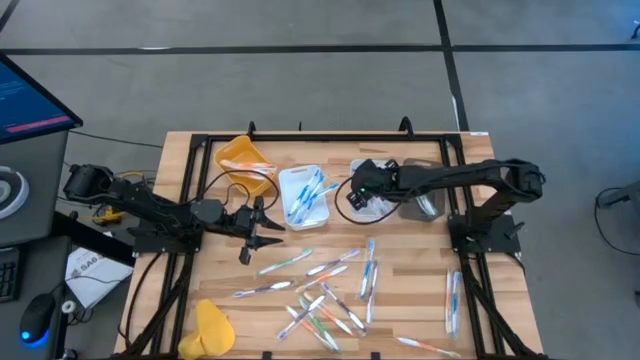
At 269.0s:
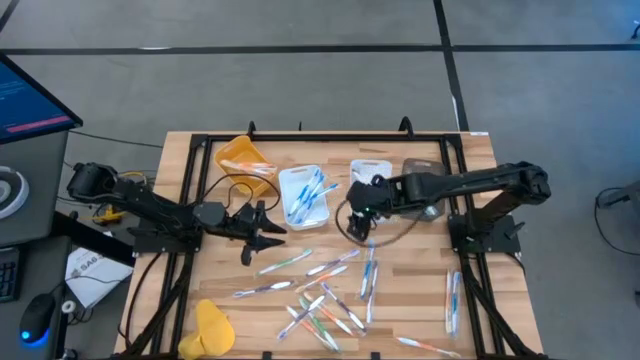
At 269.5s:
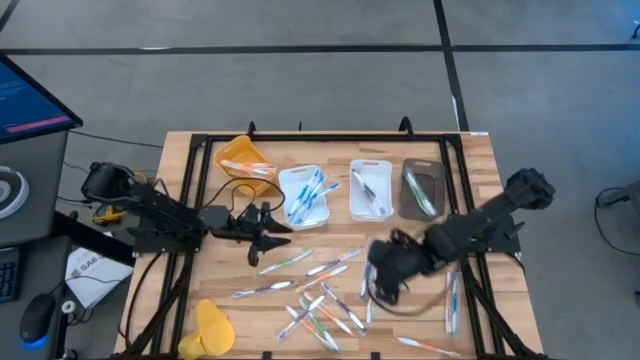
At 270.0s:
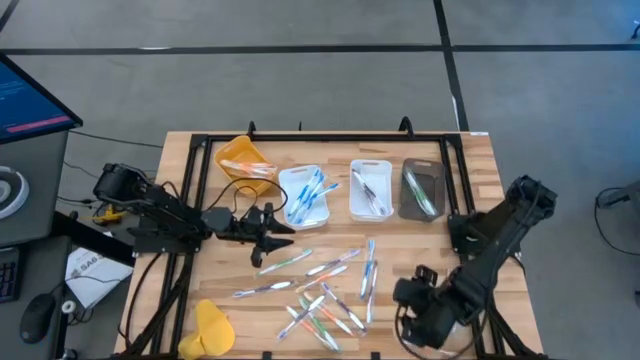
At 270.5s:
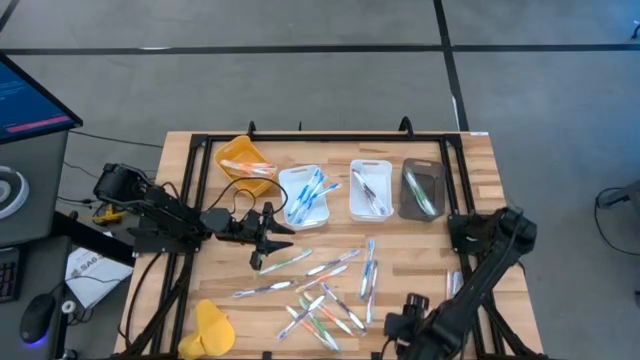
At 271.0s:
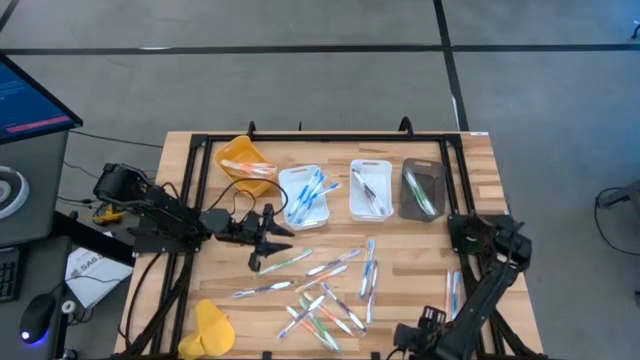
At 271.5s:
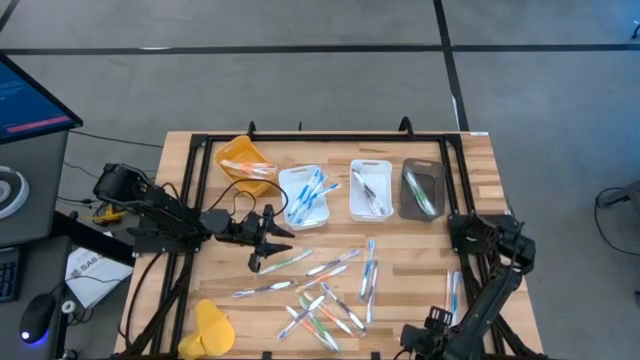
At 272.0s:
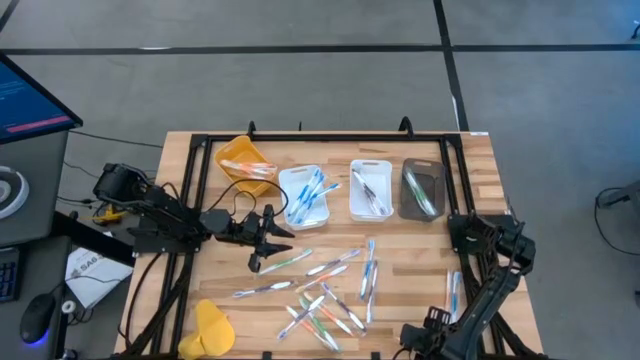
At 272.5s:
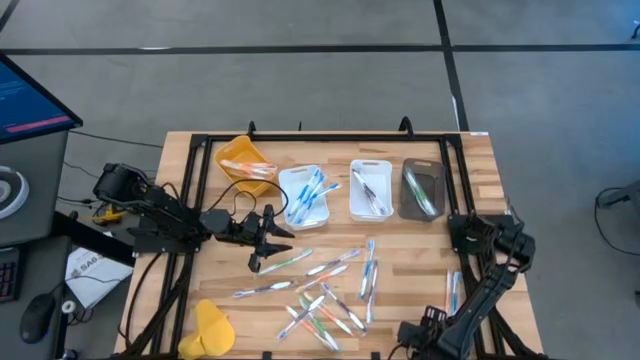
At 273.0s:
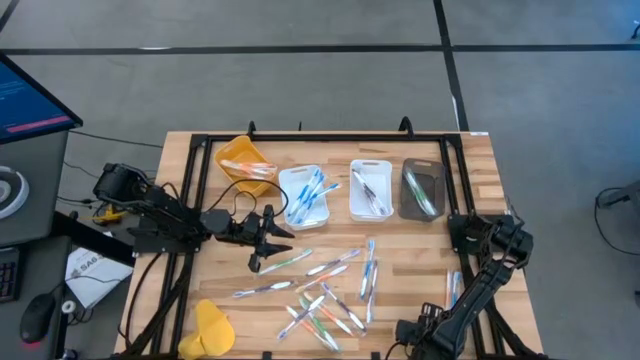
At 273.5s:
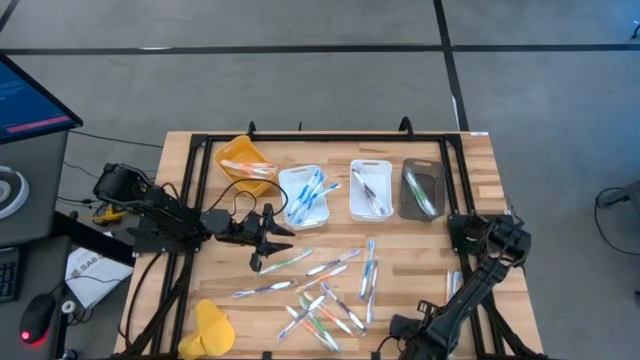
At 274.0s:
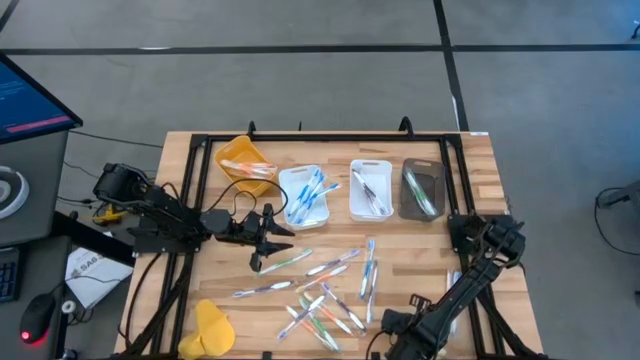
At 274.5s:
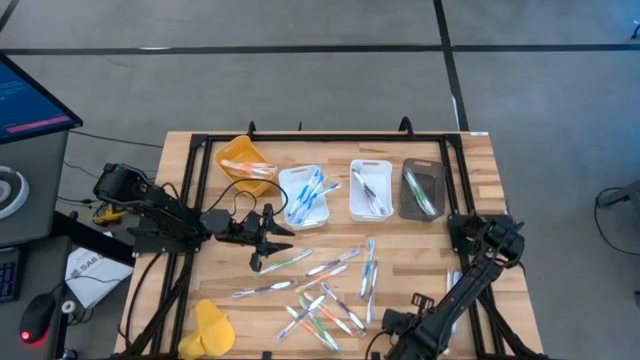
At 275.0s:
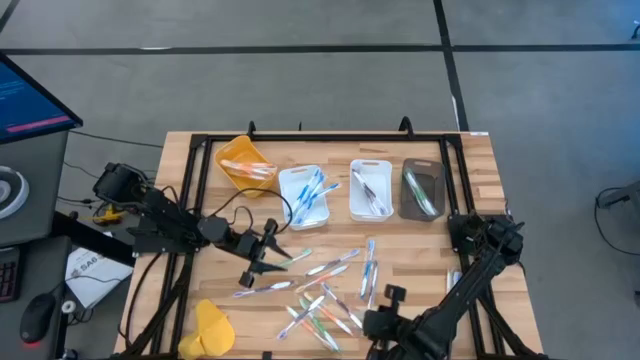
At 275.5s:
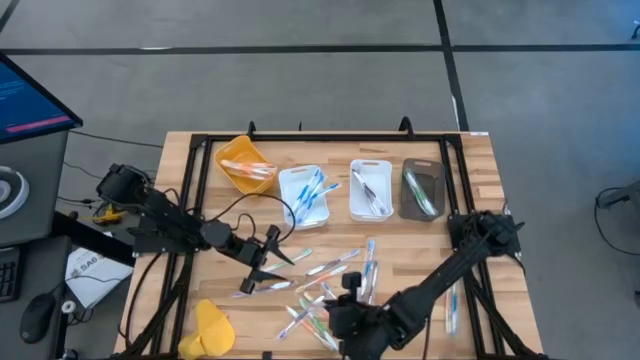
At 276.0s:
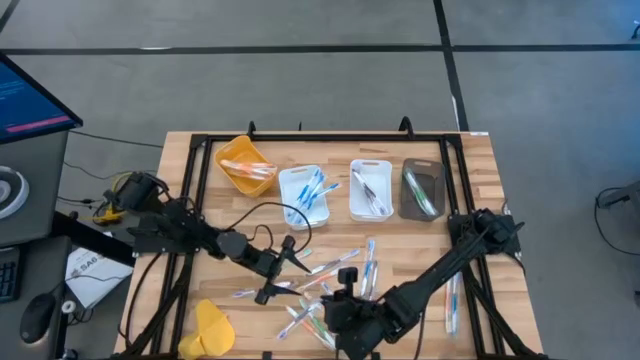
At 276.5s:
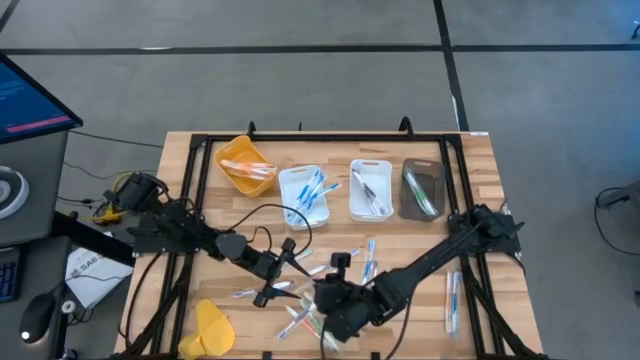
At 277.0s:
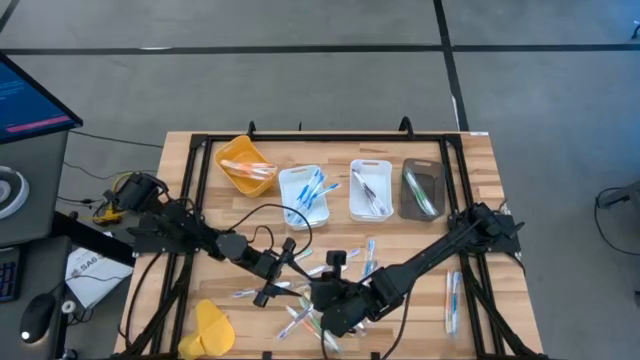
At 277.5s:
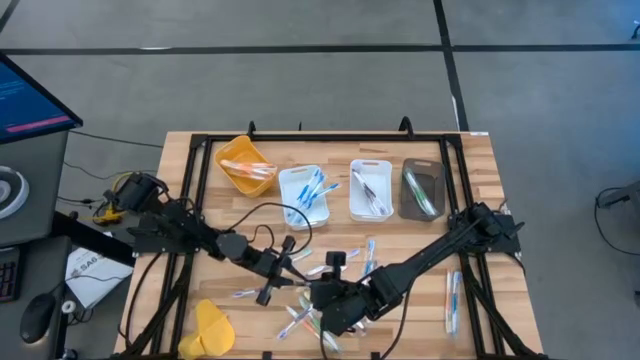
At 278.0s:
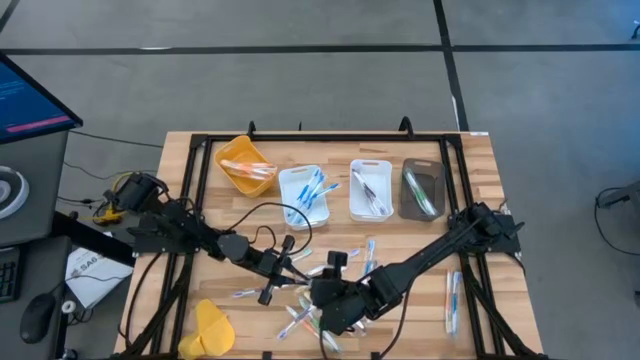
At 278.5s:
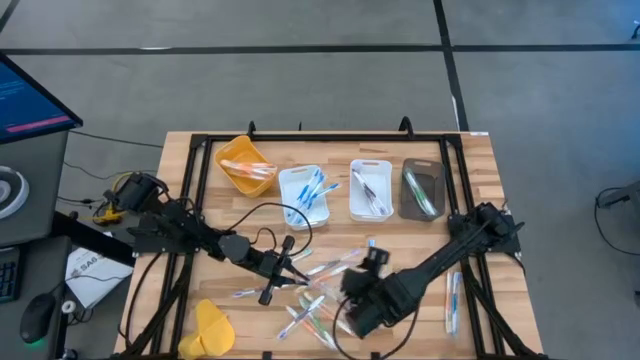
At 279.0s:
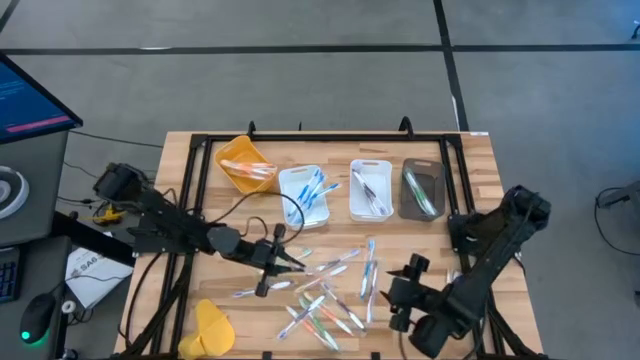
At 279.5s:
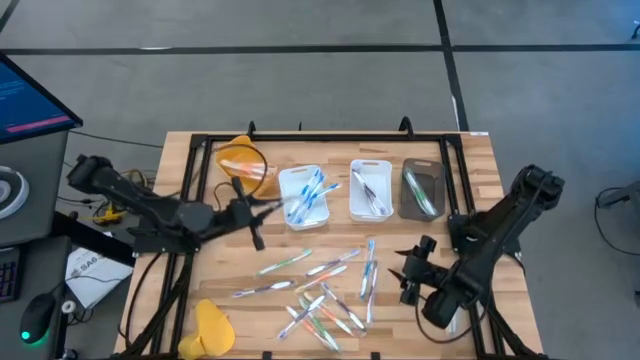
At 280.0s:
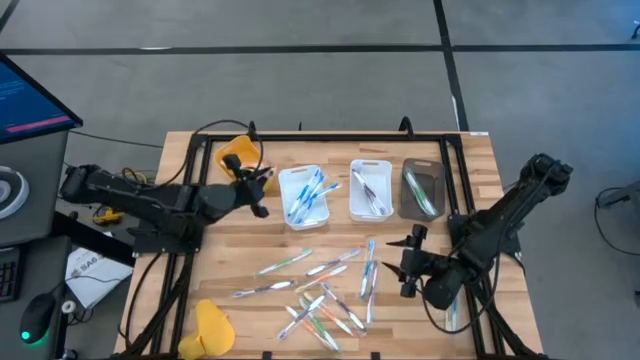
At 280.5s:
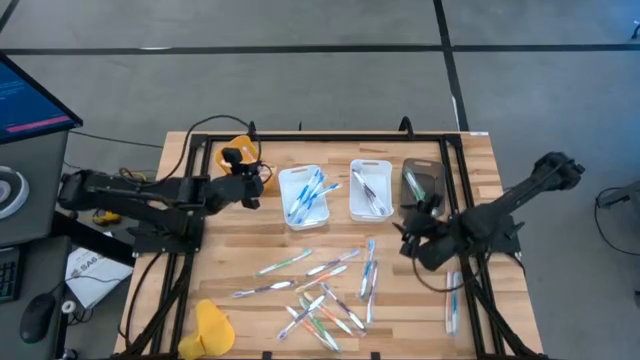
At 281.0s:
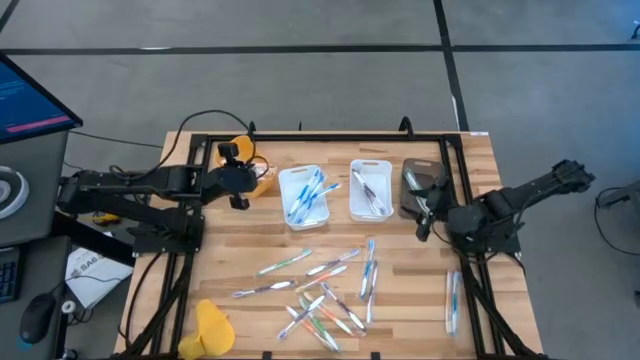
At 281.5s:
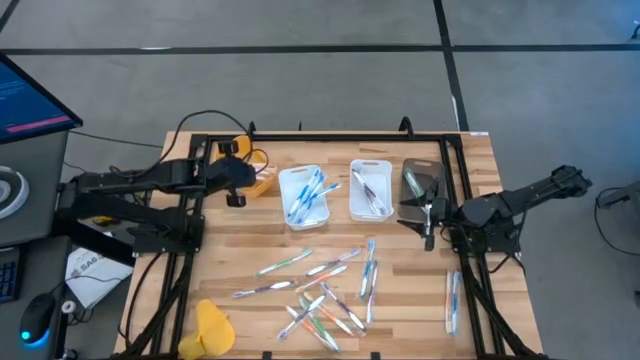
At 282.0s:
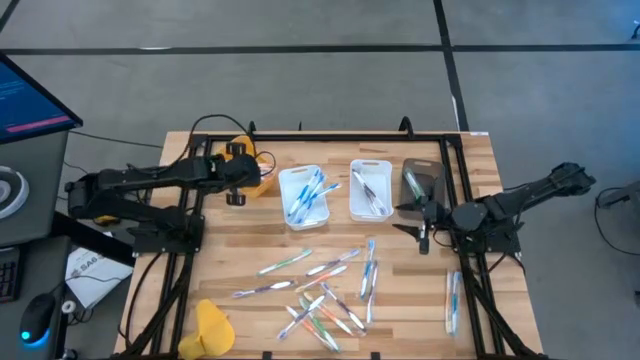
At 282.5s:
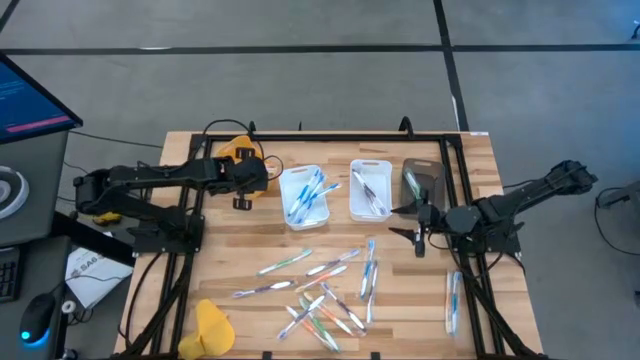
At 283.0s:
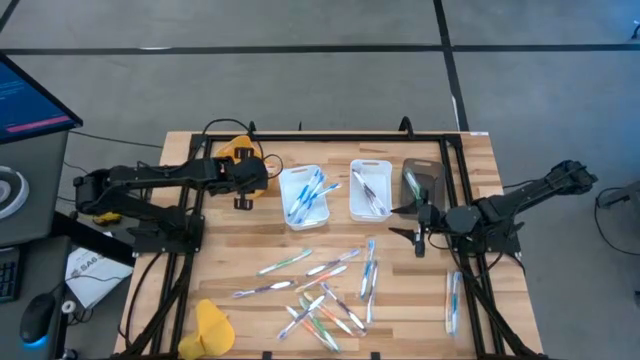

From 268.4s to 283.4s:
Task: Pick & Place Toothbrushes
Put the orange toothbrush into the orange bin

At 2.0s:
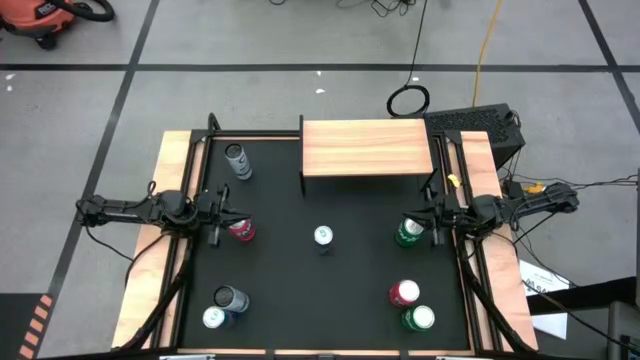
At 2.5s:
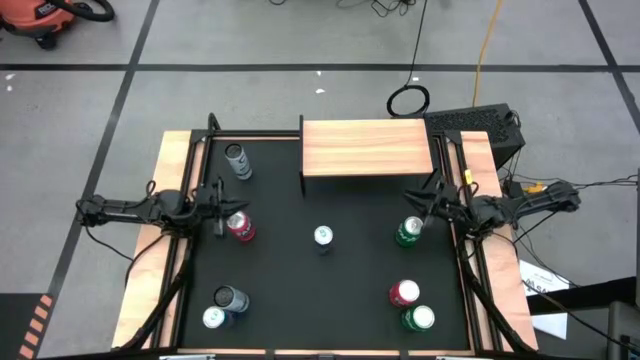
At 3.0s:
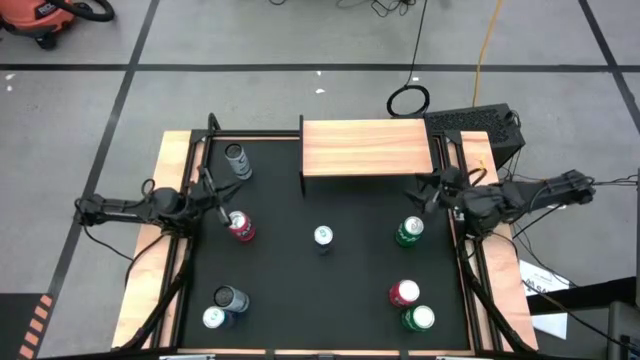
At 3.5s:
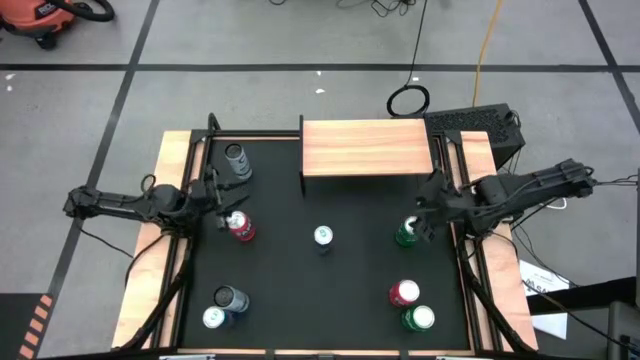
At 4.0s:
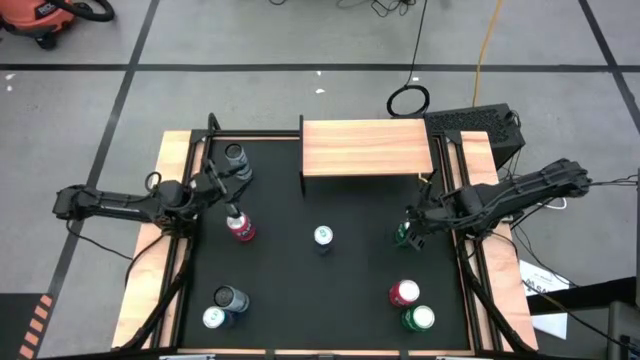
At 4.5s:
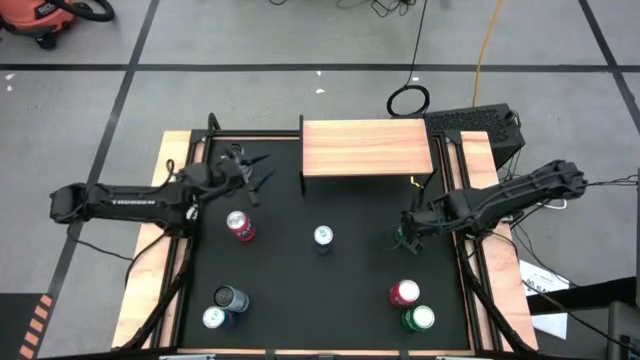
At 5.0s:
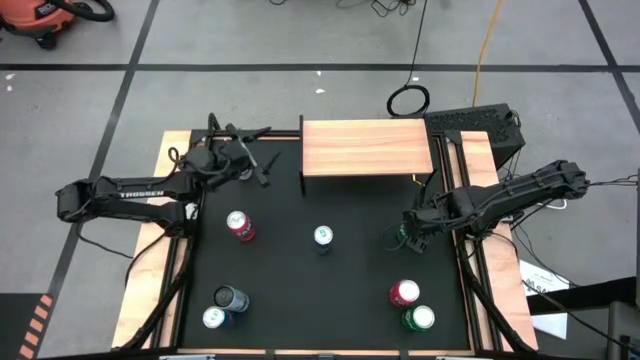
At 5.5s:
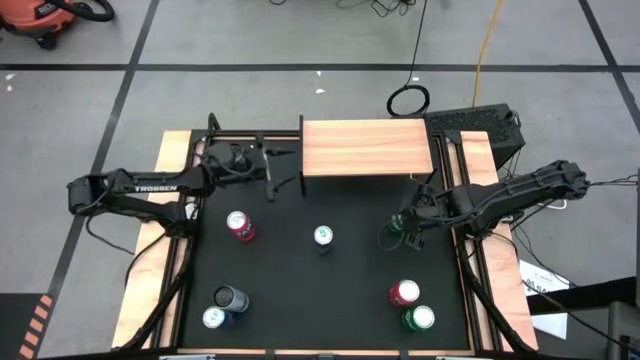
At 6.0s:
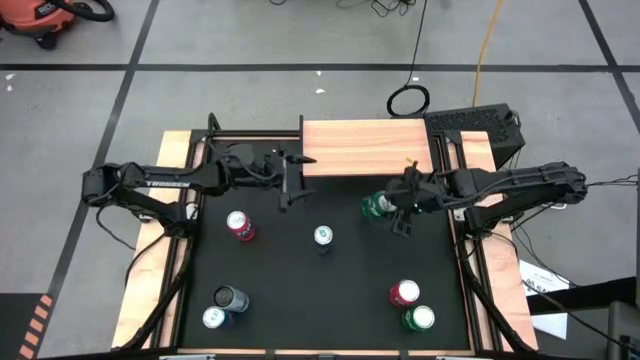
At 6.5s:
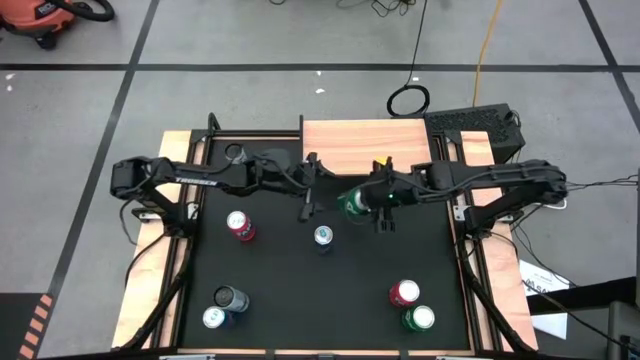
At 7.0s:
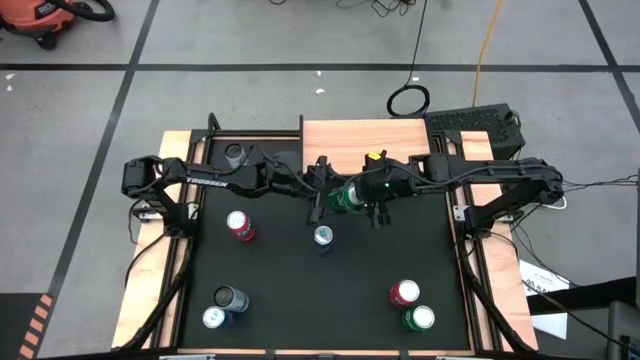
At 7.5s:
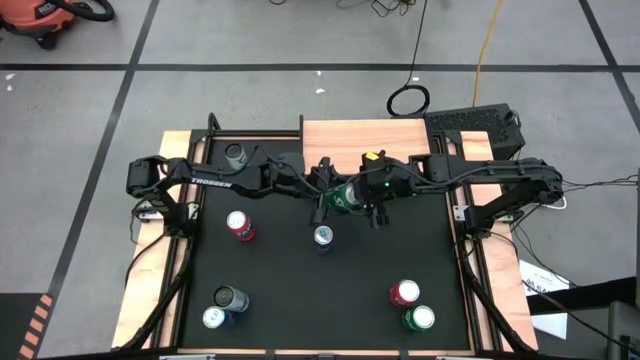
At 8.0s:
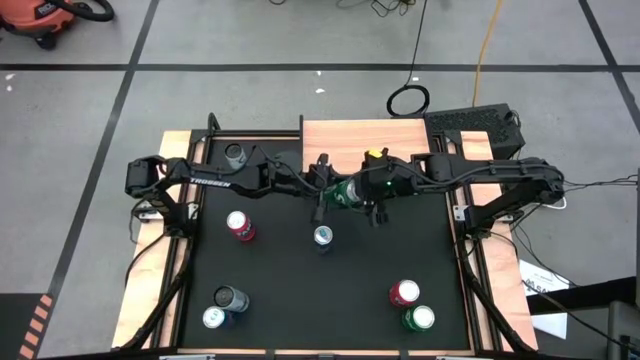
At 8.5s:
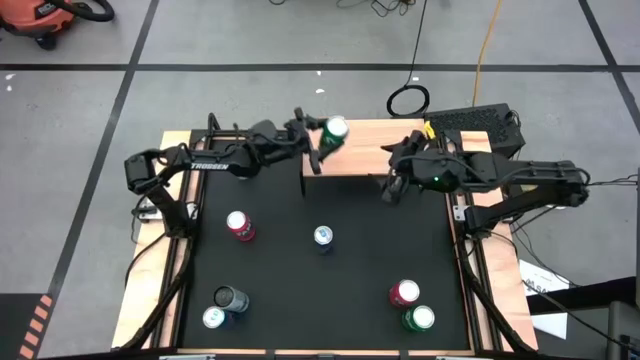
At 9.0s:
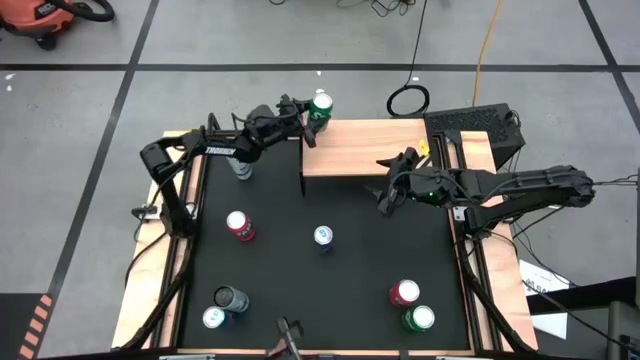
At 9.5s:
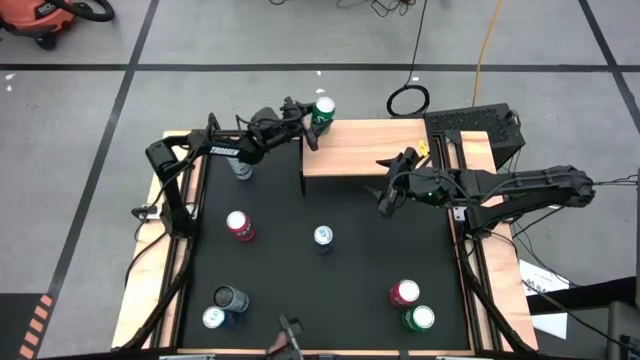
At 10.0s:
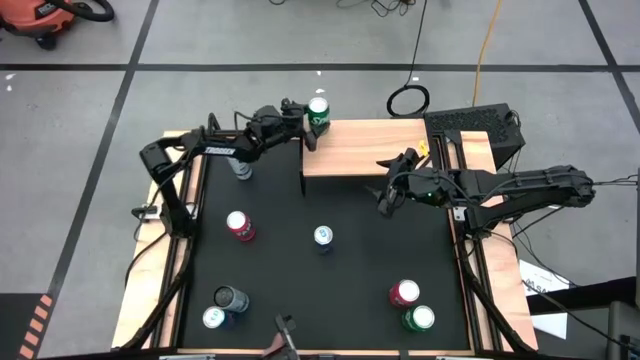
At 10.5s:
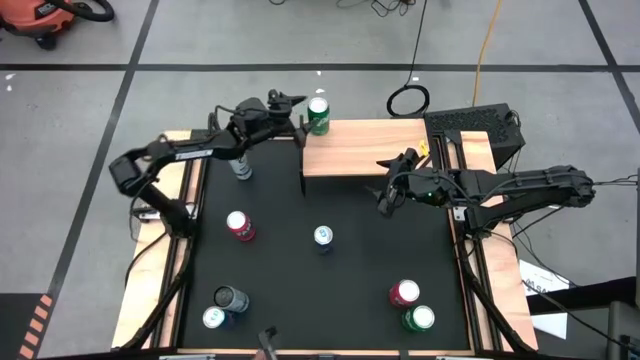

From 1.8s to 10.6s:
Task: Place canned beverage on shelf
Put the top green soda can on the shelf
